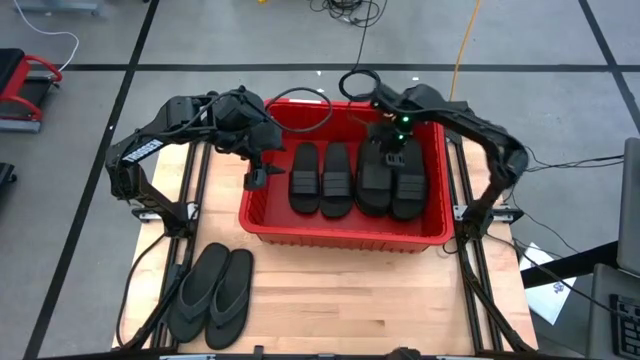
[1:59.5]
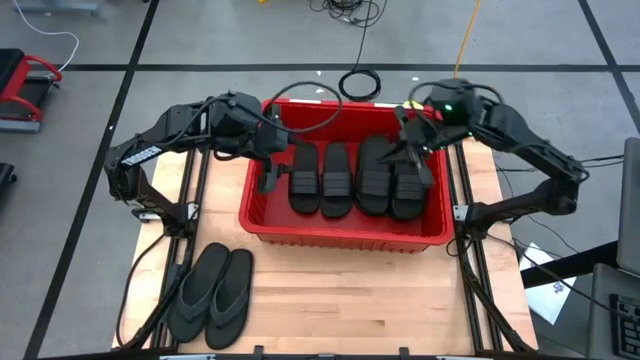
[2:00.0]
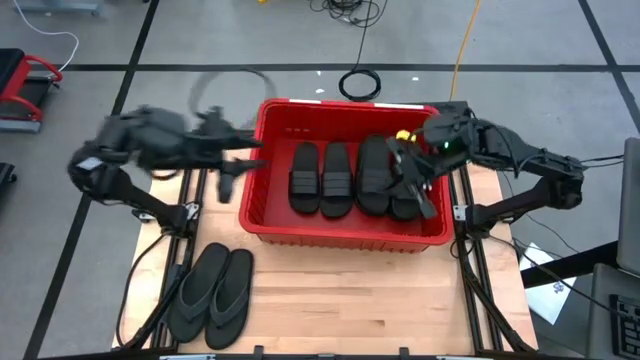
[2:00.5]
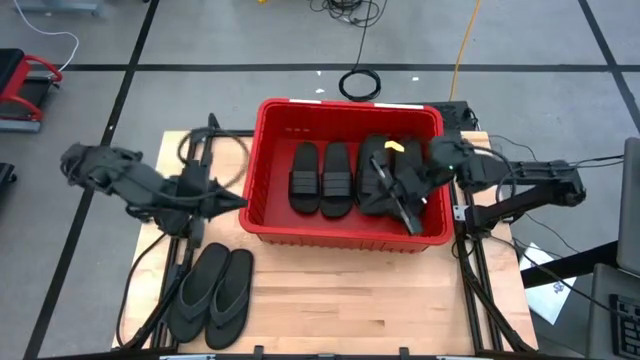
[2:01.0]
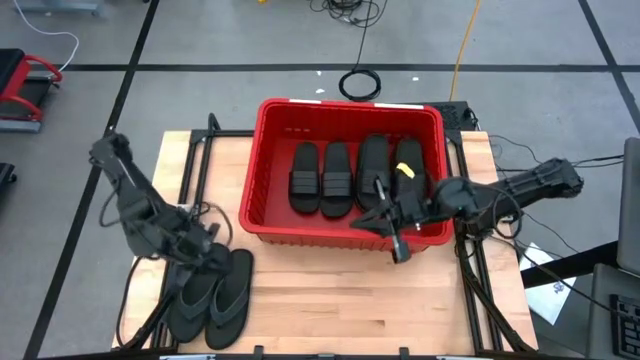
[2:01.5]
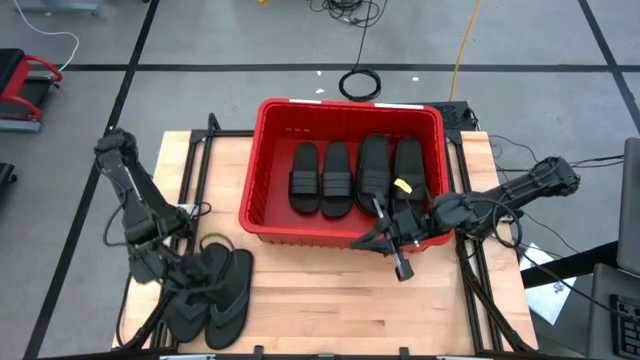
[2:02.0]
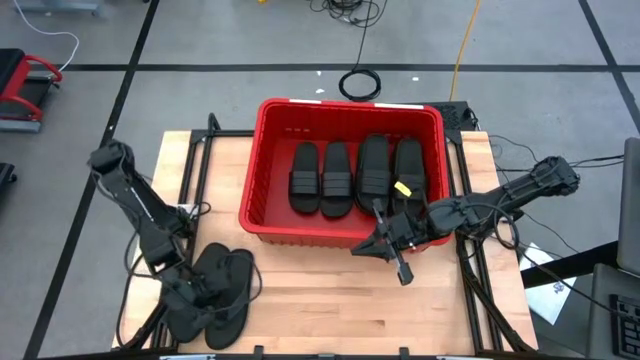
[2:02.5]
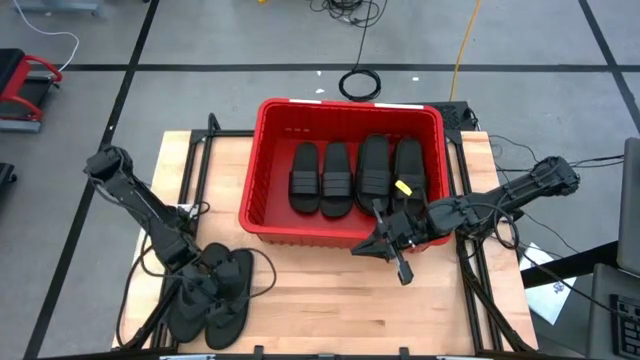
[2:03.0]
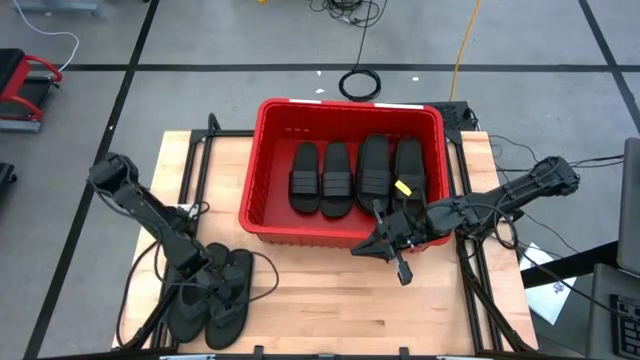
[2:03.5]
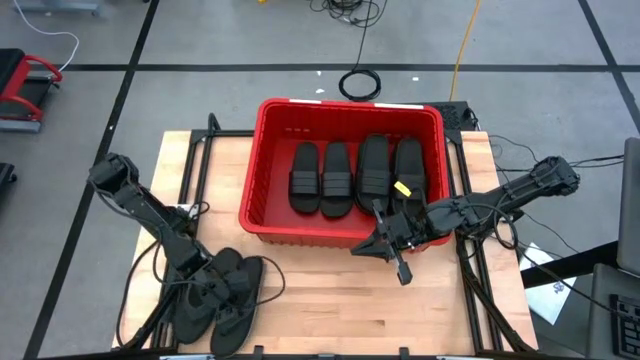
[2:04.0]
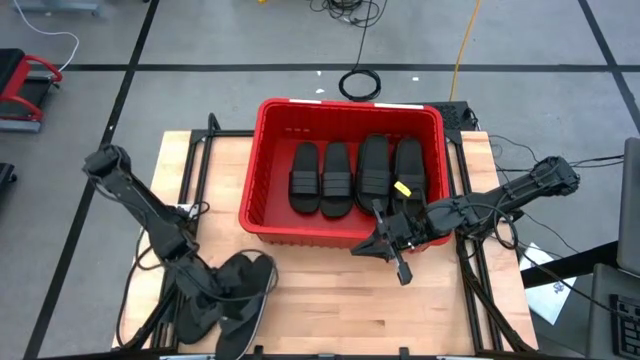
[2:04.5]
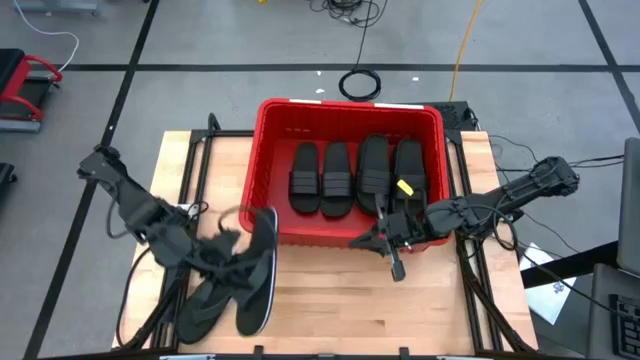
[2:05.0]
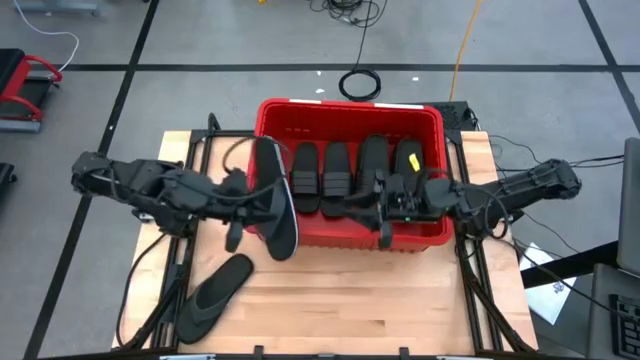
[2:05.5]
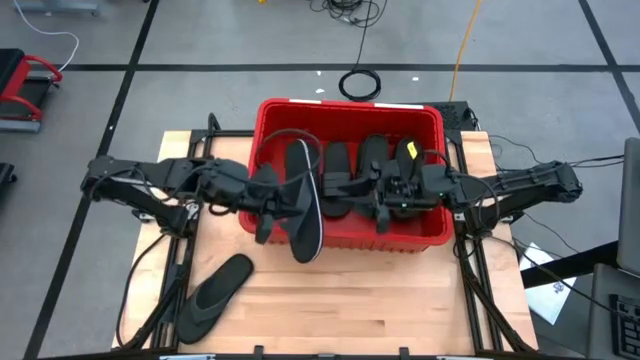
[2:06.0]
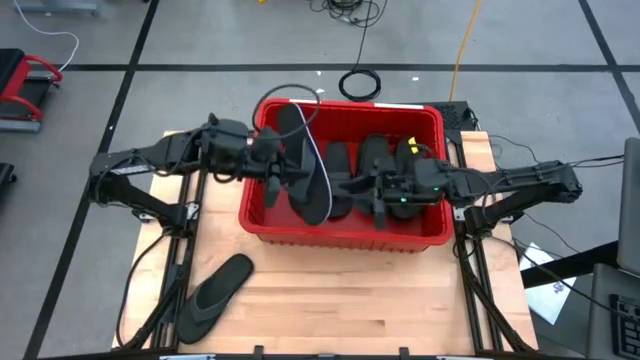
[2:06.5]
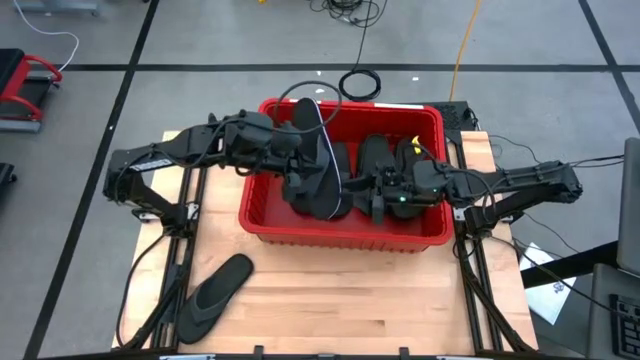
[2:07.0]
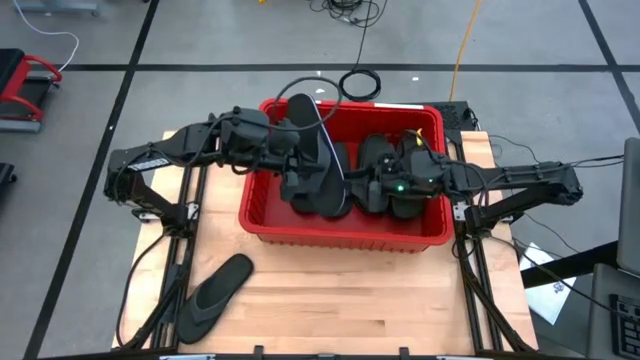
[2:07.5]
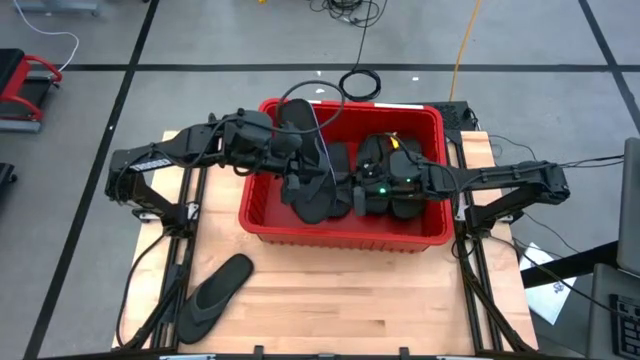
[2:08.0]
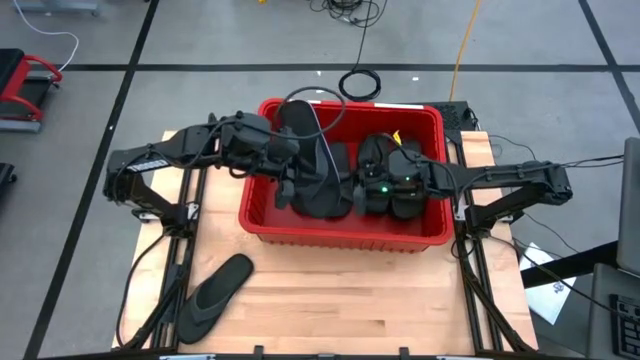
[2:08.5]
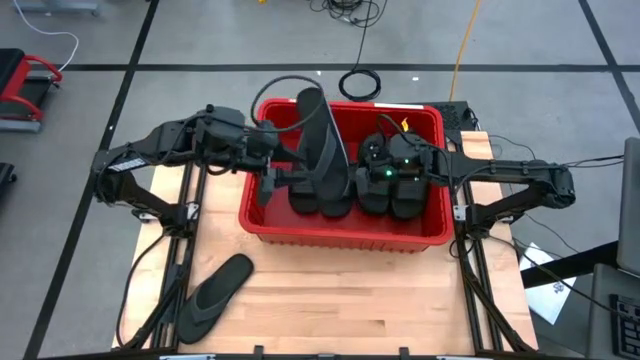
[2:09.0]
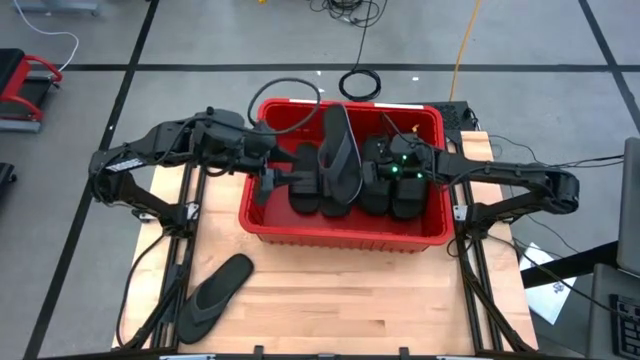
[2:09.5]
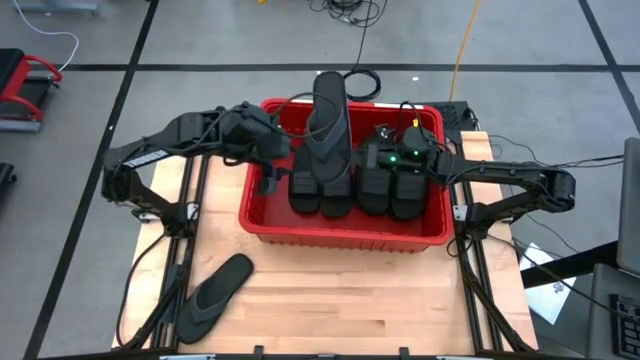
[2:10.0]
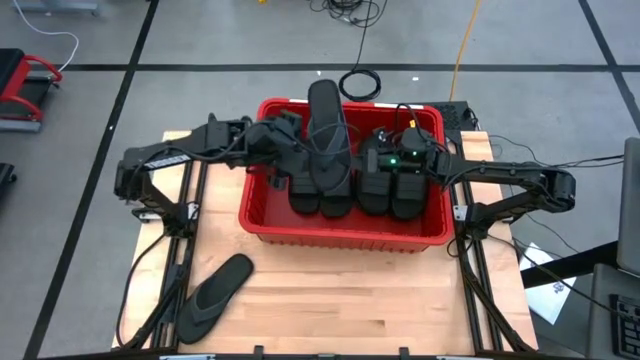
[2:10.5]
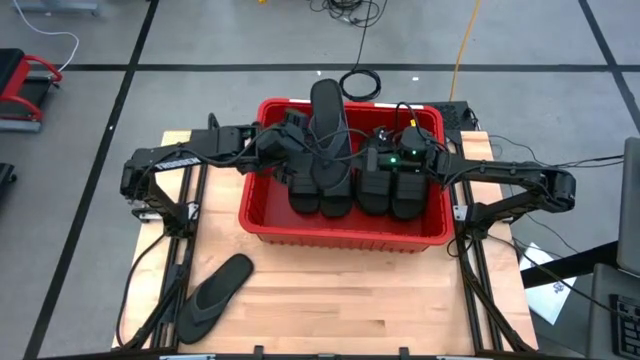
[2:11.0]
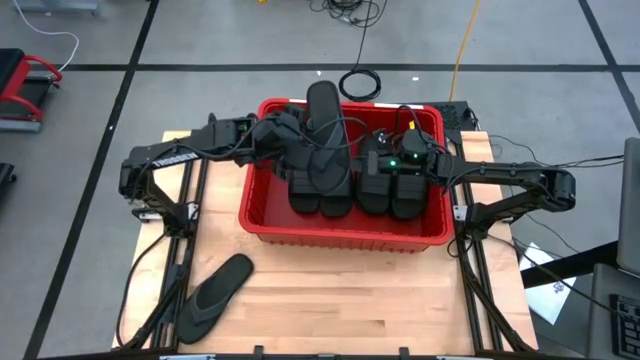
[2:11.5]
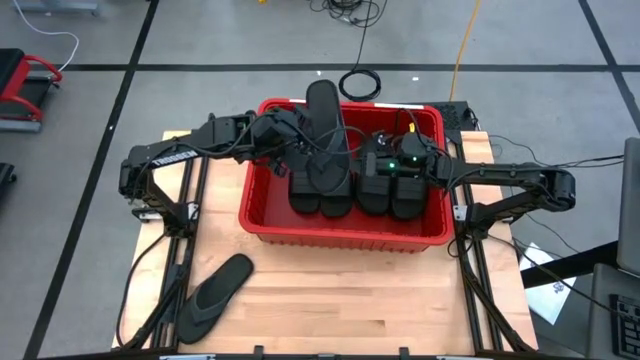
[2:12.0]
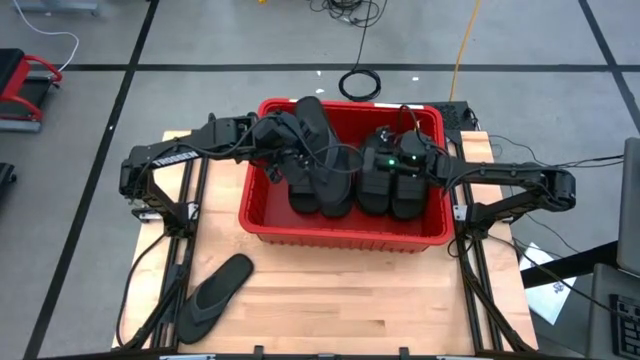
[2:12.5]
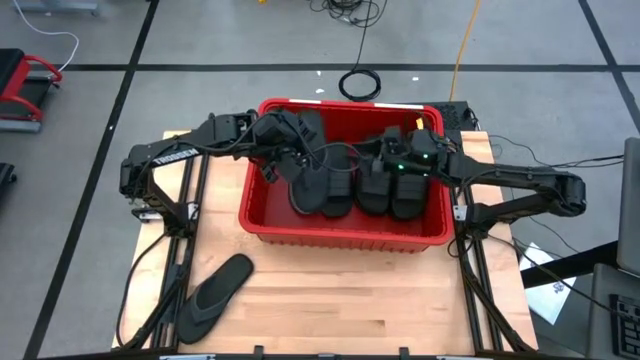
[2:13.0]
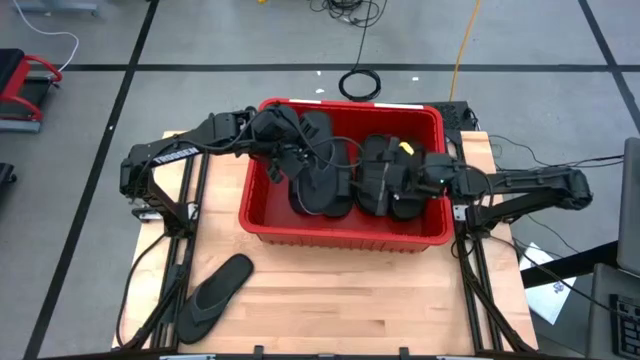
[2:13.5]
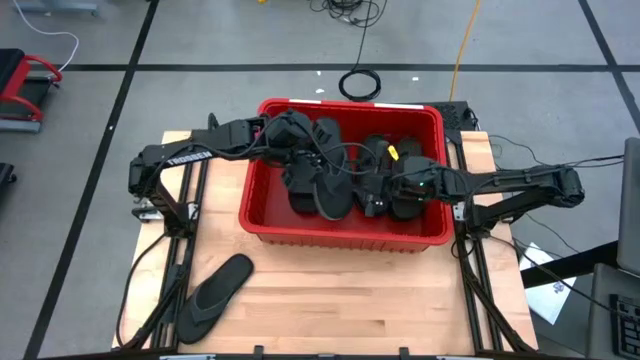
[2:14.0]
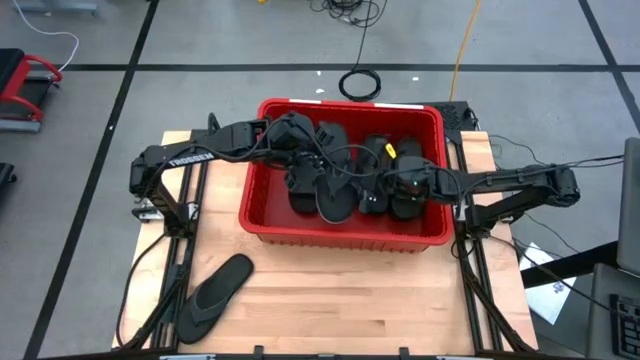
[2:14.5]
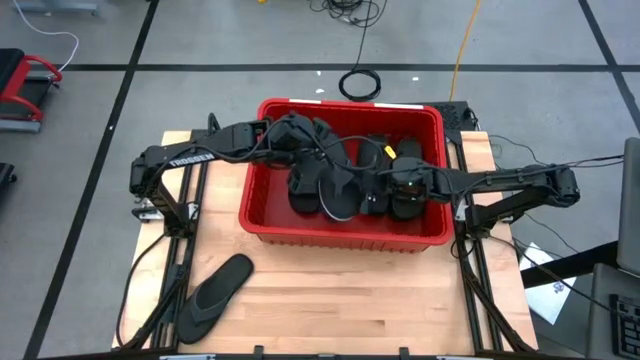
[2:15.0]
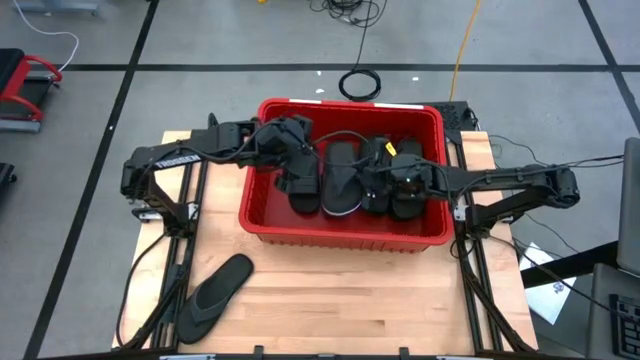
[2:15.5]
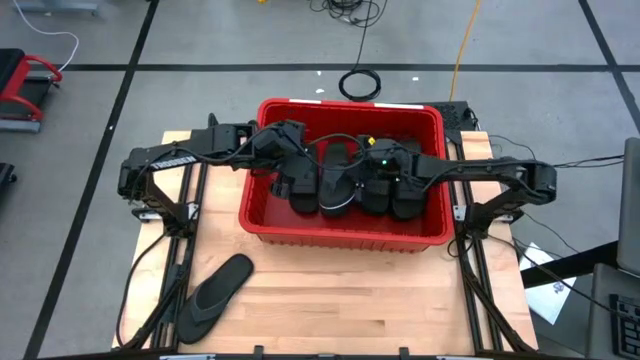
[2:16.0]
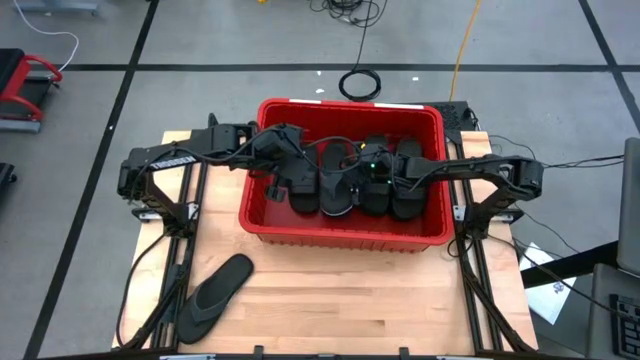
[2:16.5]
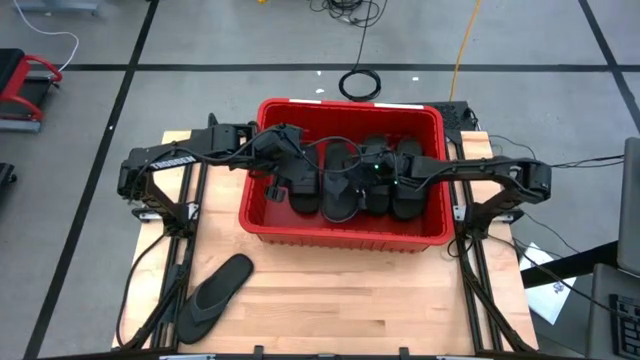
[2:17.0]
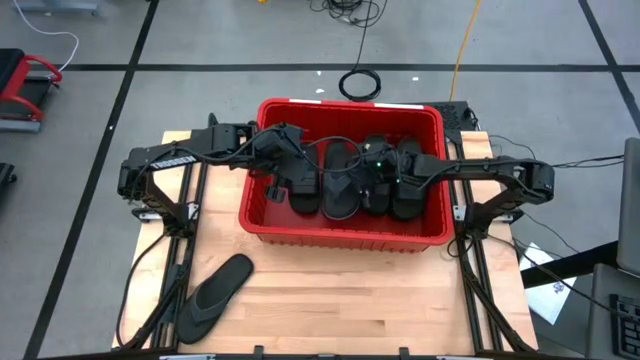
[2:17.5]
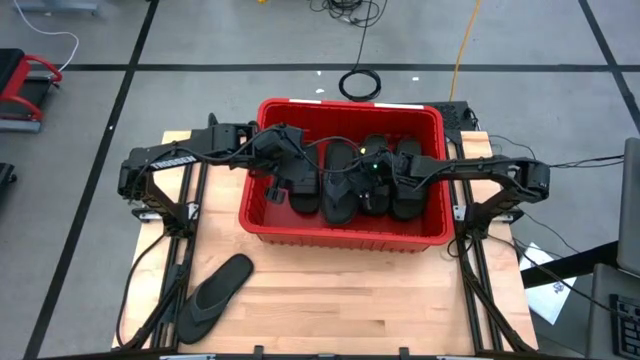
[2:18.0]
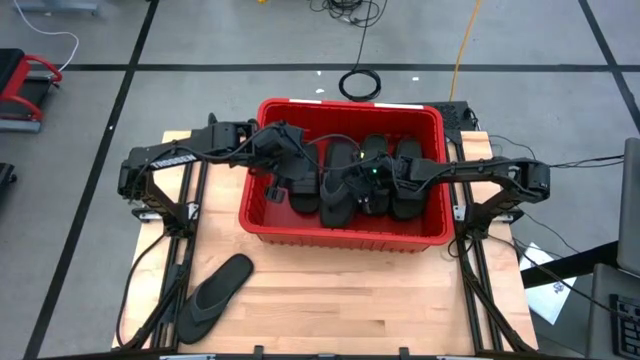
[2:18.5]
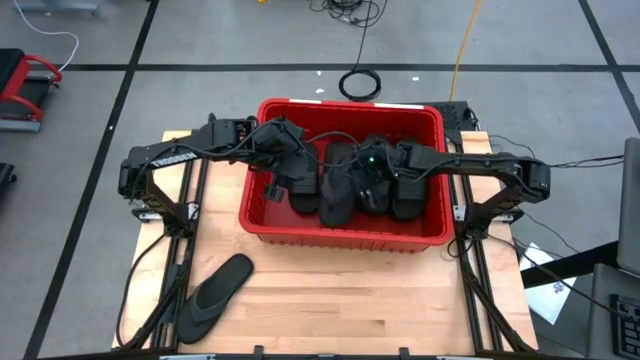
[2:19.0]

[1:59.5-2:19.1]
Task: Pick and place slides into bin
Put the black slipper into the red organizer bin

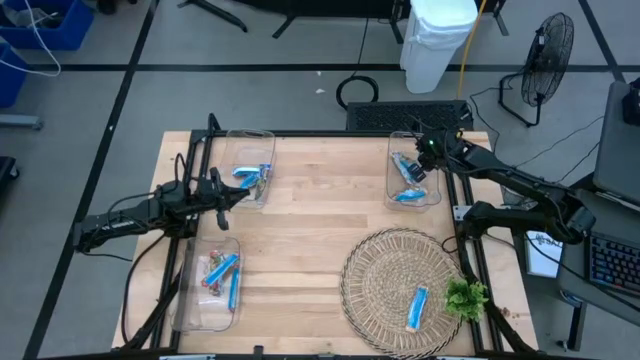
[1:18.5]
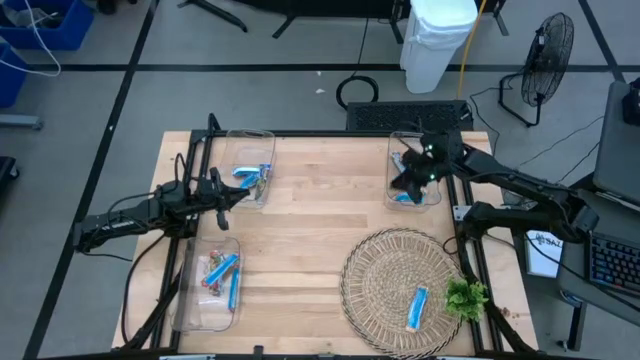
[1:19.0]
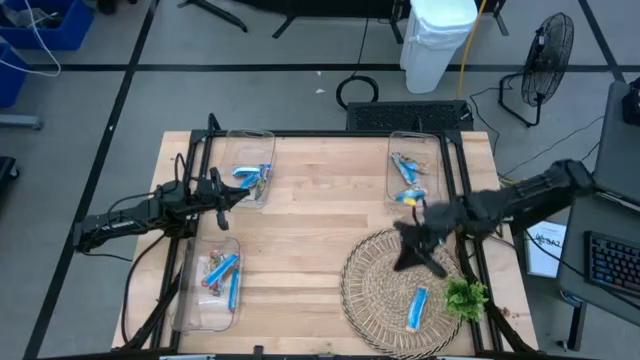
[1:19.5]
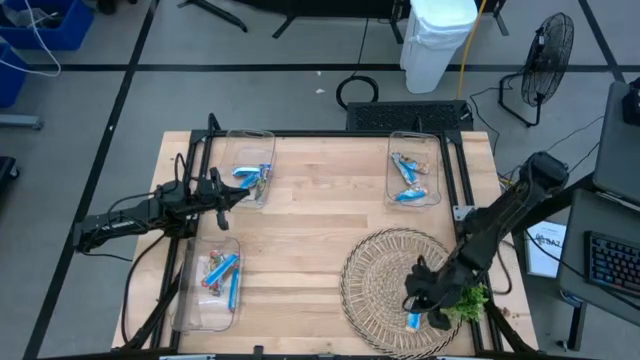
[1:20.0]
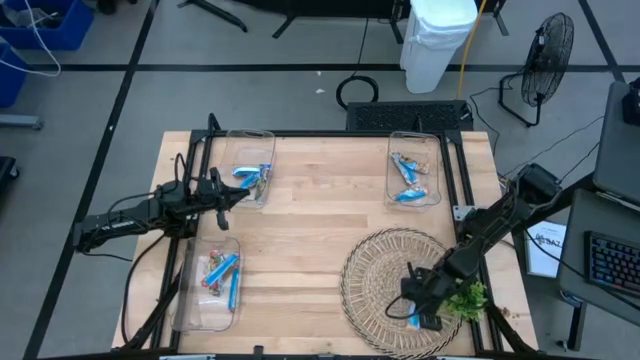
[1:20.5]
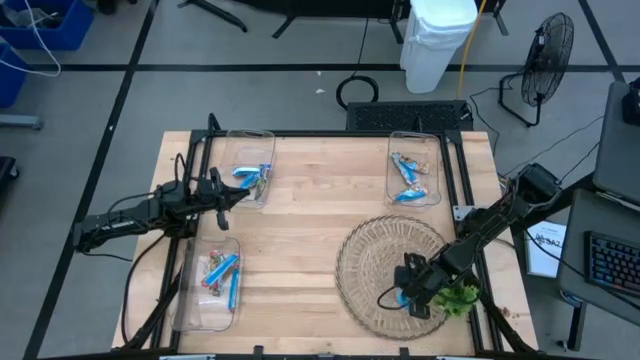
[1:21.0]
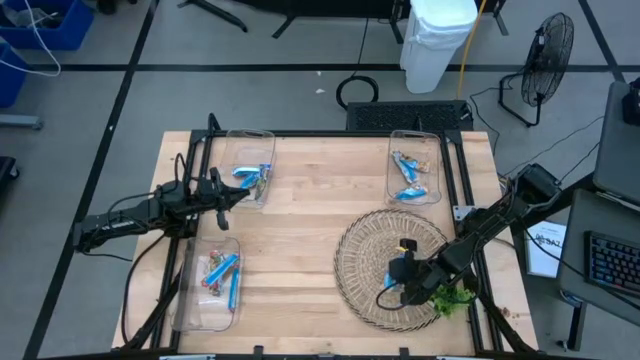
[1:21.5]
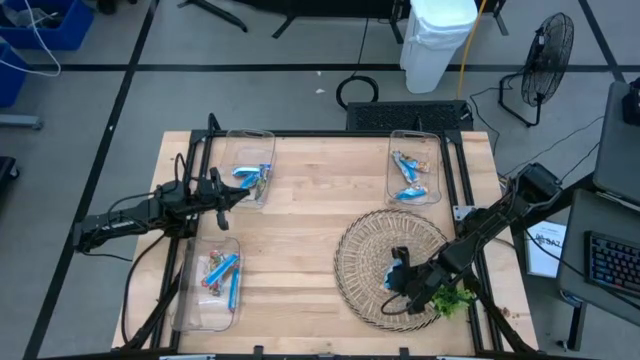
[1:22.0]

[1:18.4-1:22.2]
Task: Pick and place Granola Bars by type
Put the yellow granola bar into the top right transparent bin
